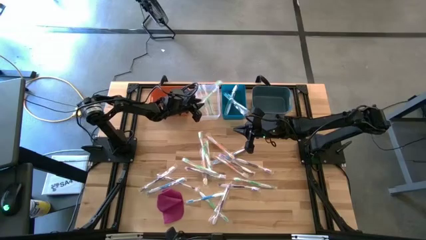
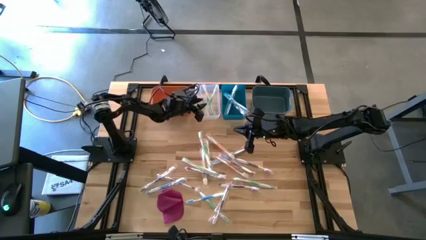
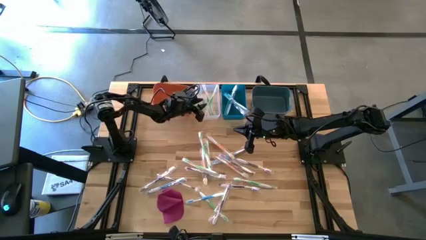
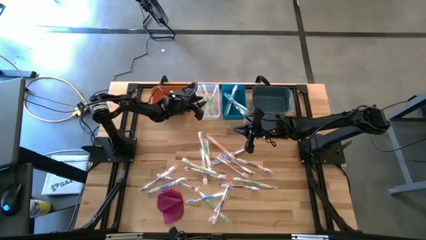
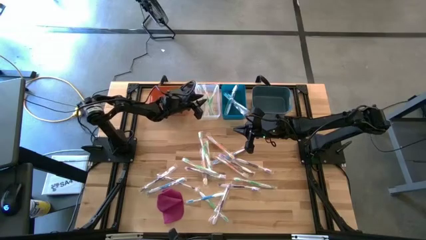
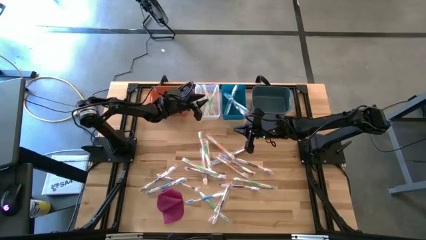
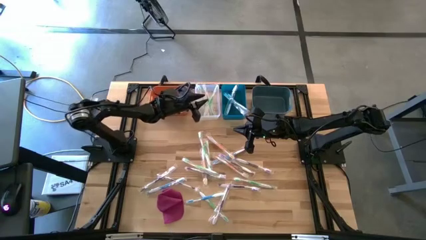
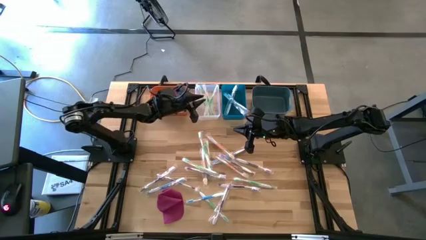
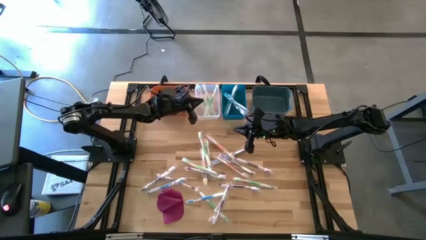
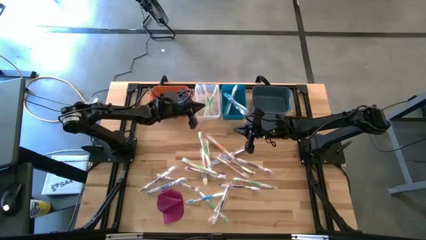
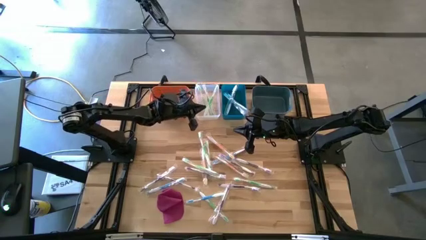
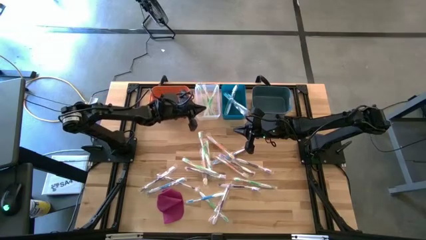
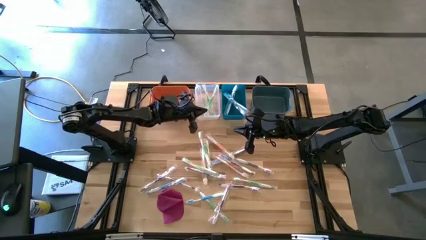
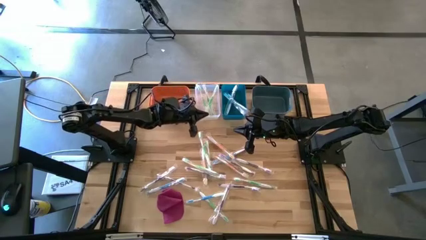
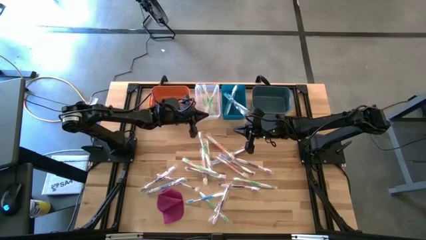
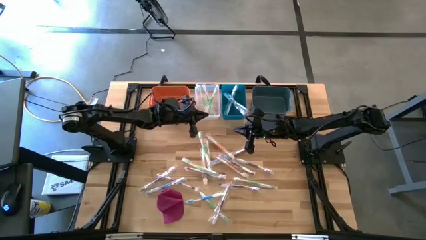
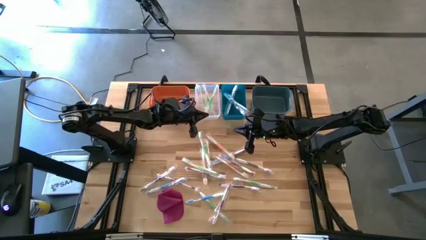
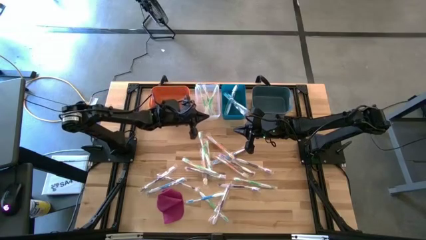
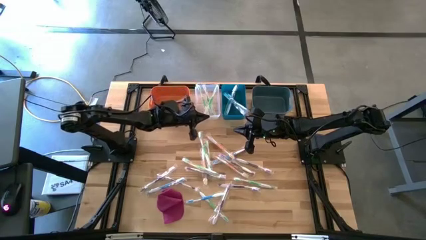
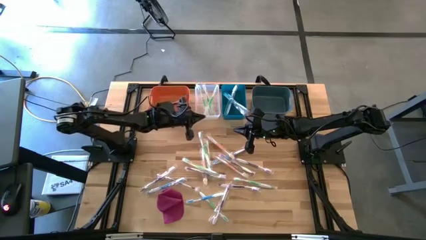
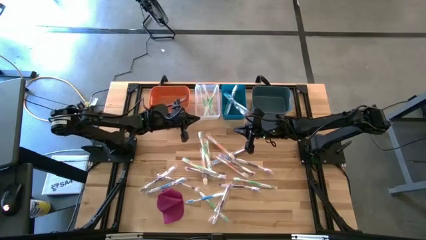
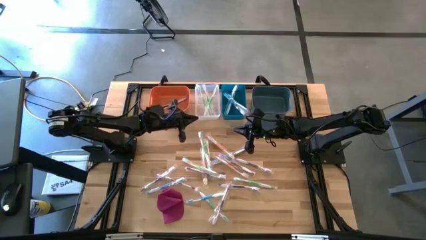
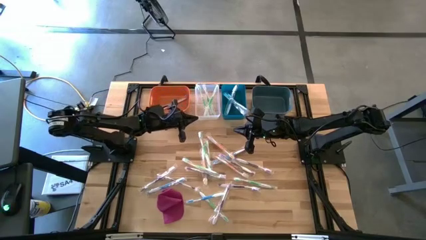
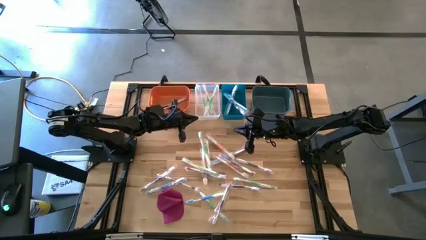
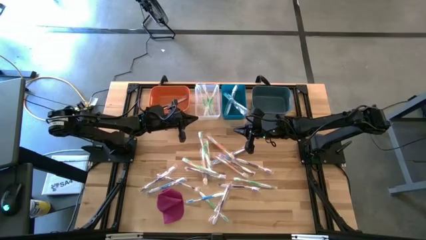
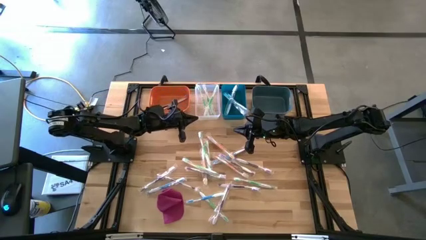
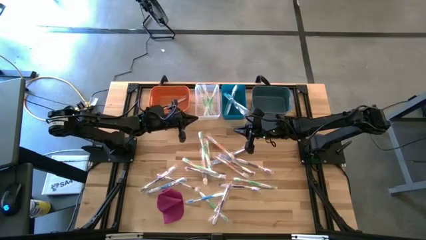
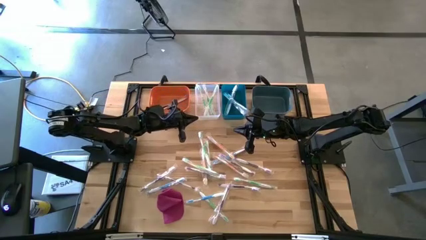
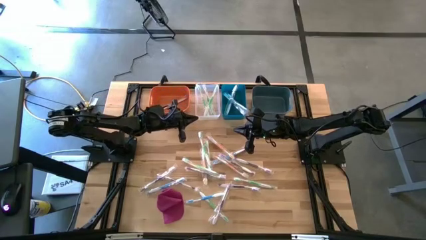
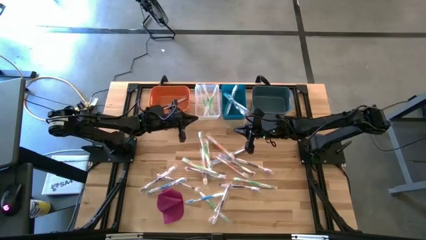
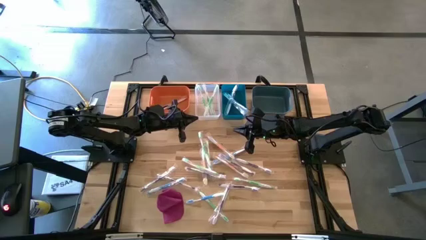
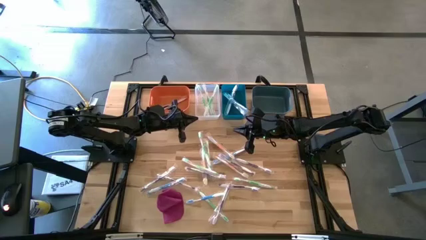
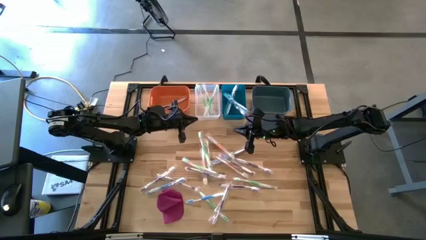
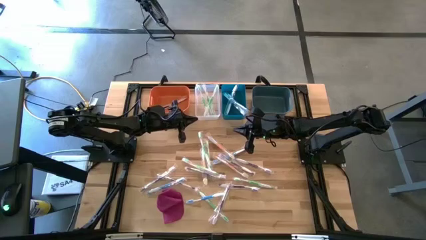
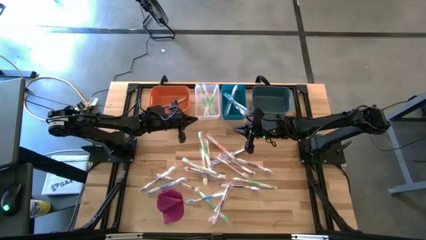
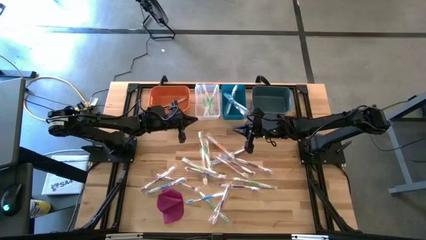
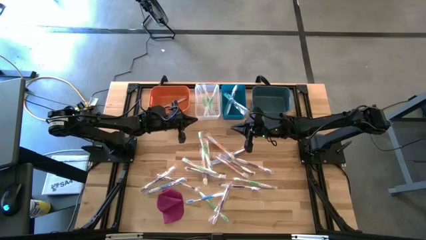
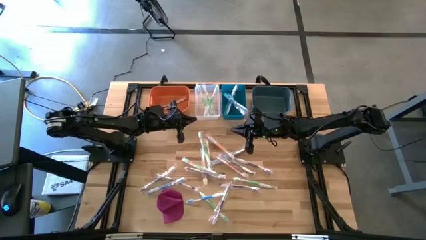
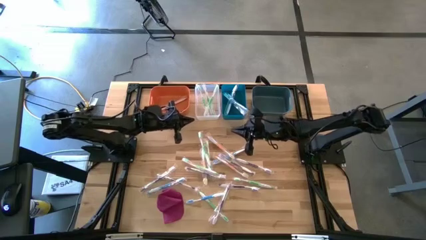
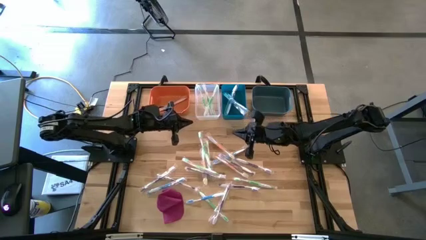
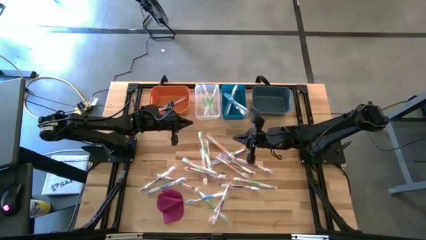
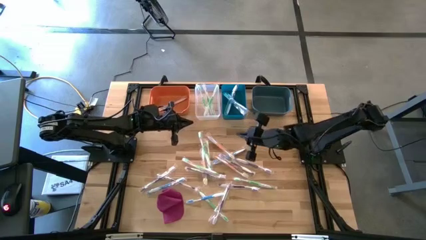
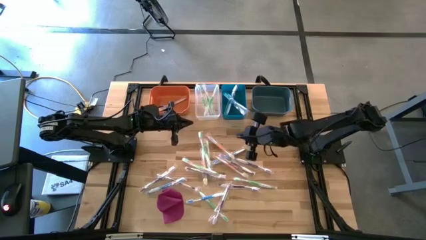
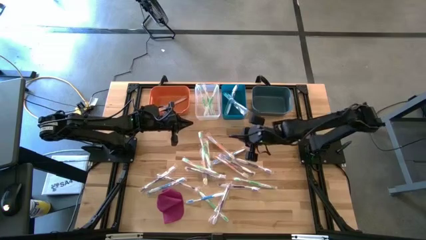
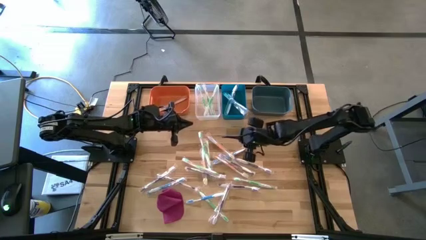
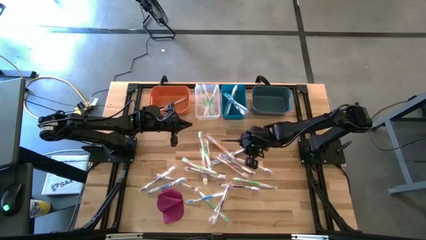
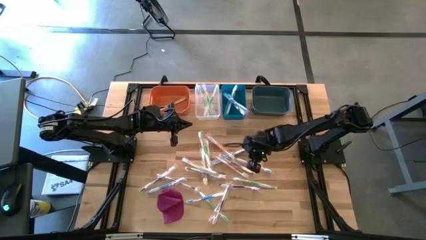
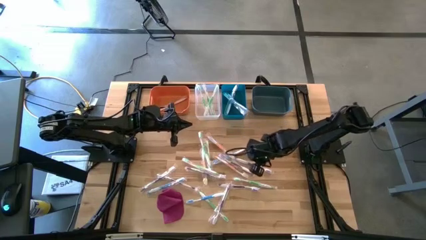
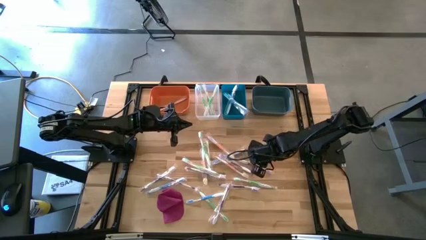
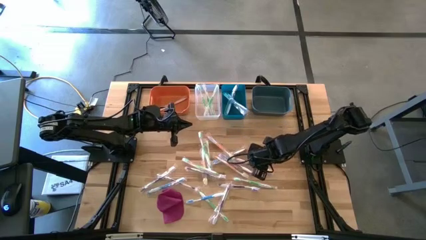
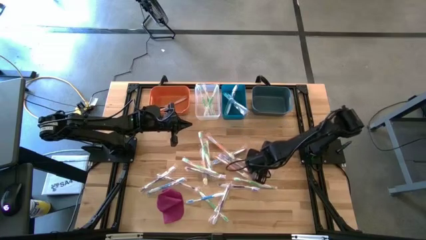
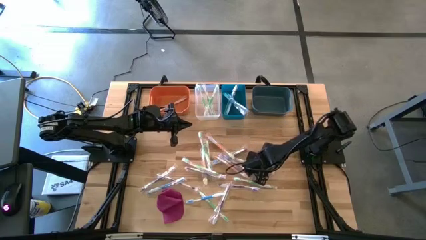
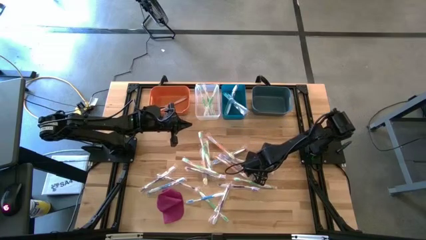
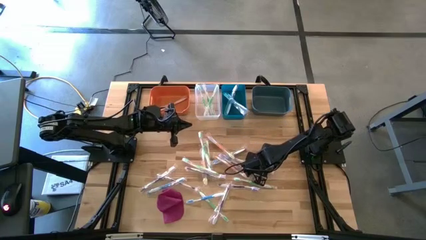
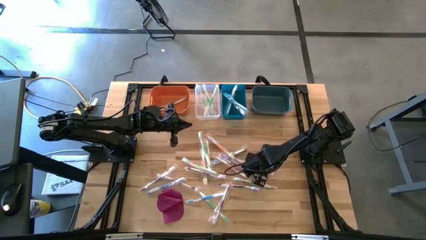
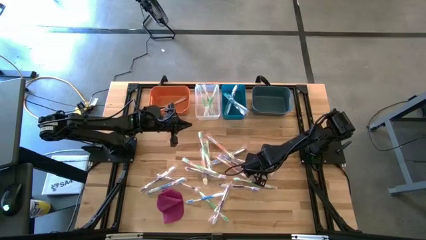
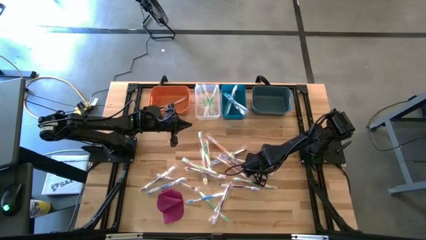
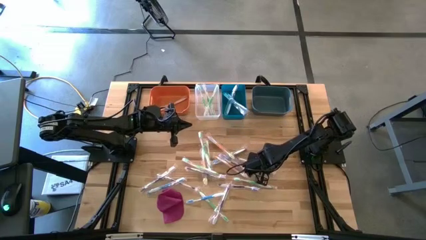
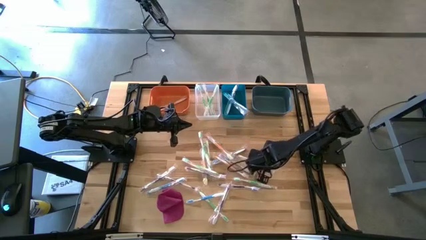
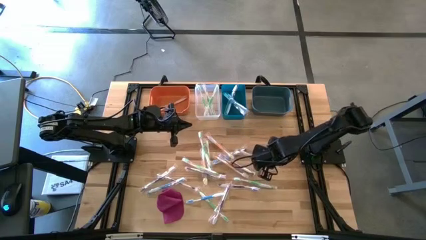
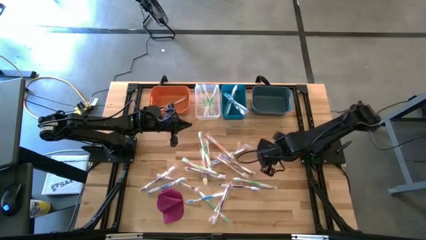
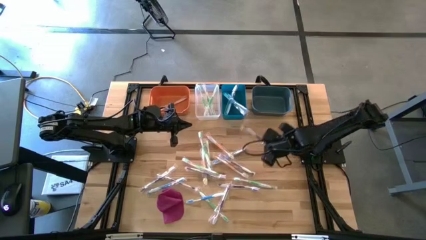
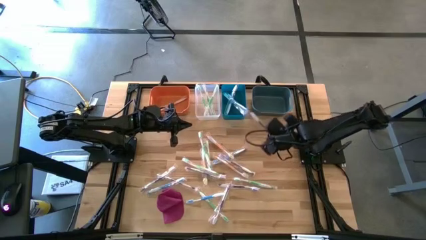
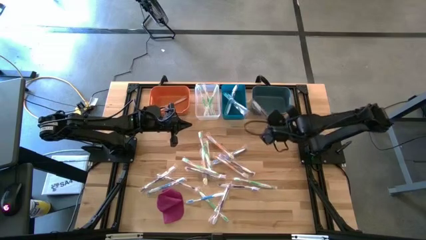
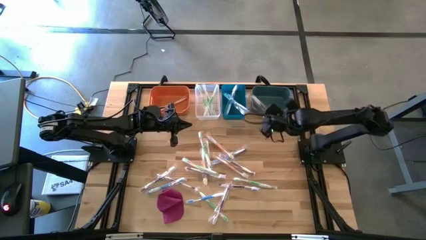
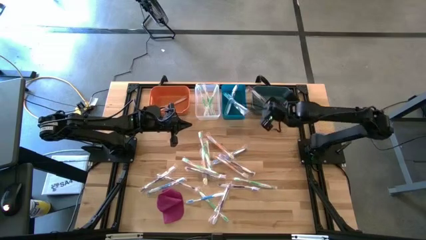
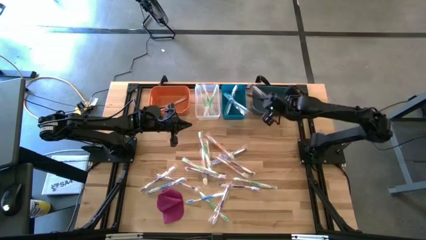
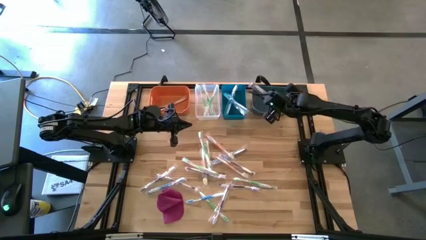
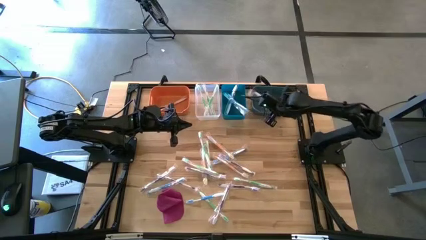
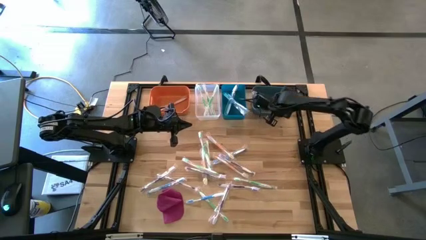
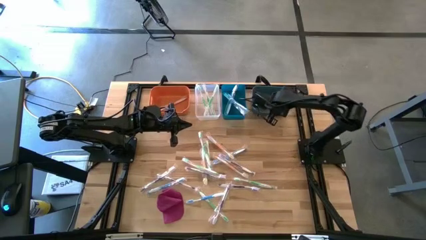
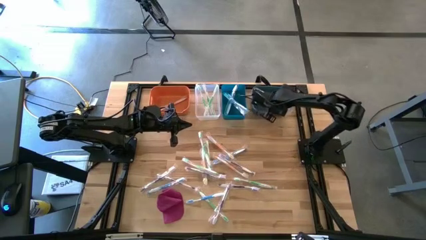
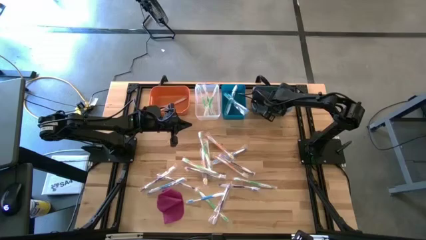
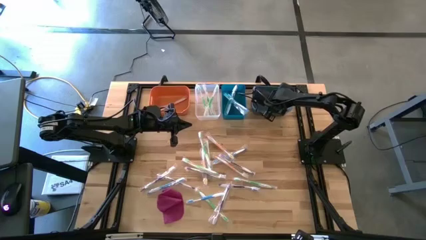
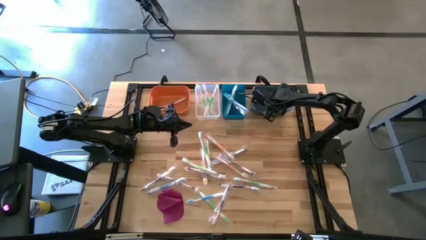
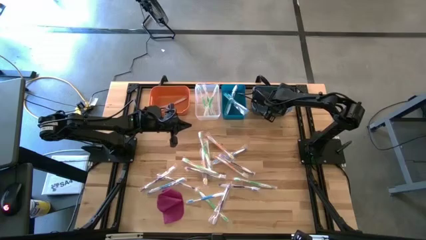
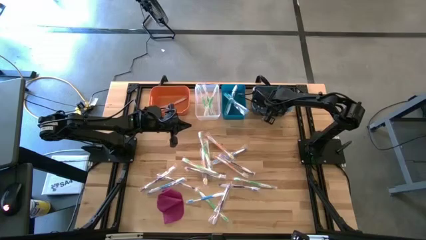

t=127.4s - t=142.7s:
Task: Pick & Place Toothbrushes
Put the purple toothbrush into the green bin
